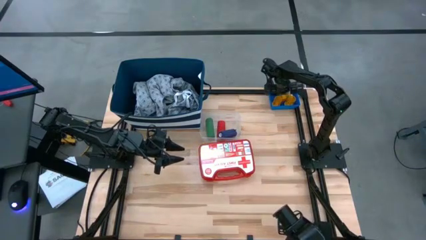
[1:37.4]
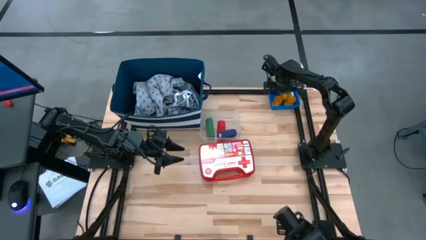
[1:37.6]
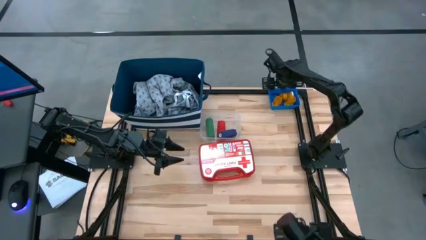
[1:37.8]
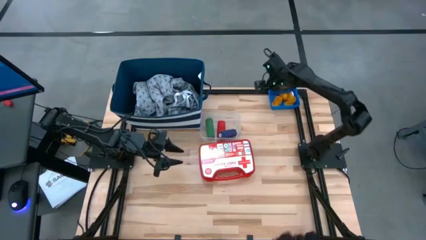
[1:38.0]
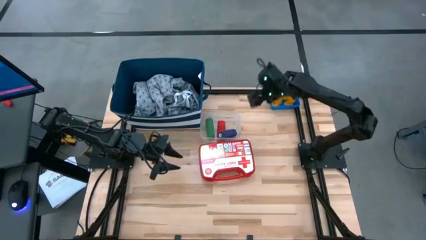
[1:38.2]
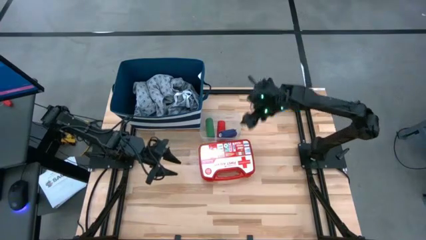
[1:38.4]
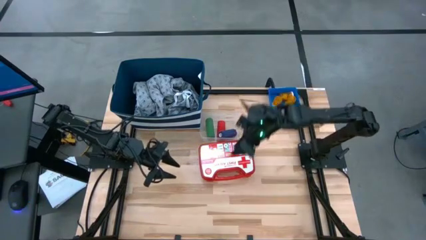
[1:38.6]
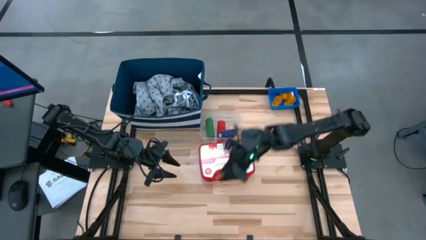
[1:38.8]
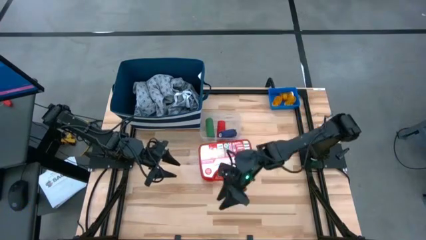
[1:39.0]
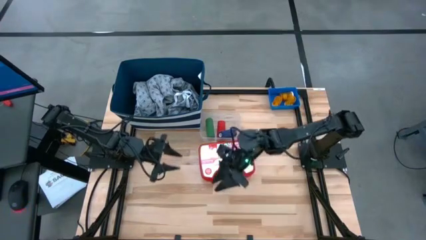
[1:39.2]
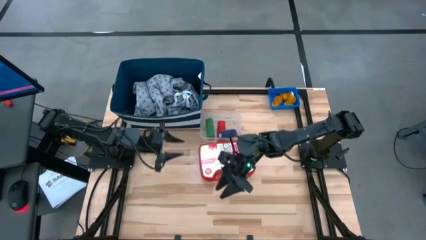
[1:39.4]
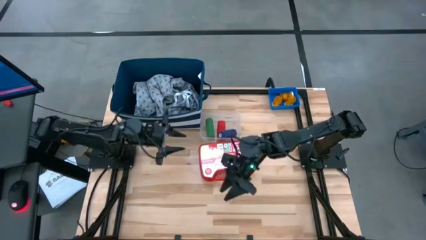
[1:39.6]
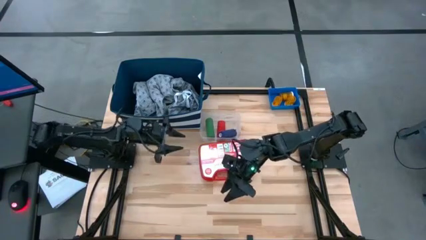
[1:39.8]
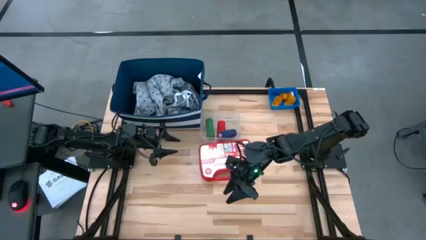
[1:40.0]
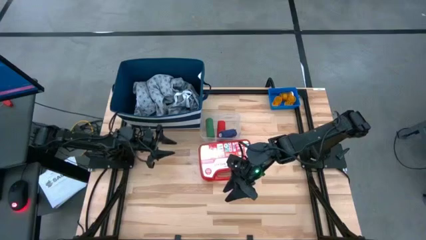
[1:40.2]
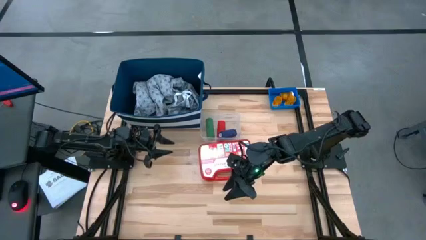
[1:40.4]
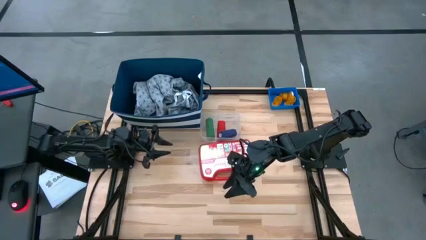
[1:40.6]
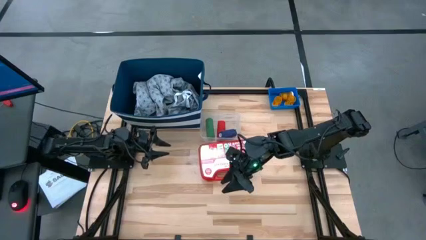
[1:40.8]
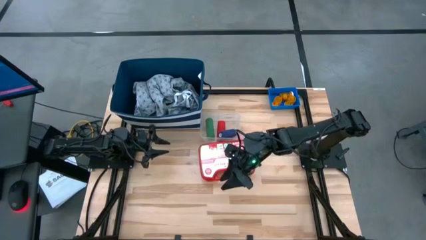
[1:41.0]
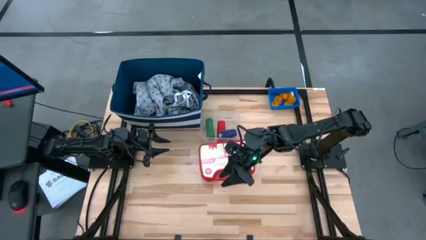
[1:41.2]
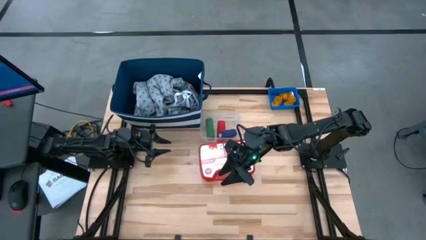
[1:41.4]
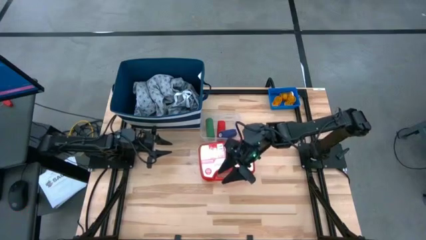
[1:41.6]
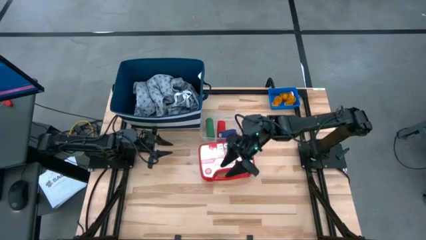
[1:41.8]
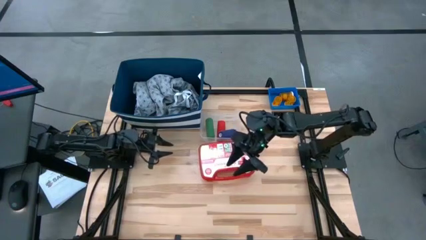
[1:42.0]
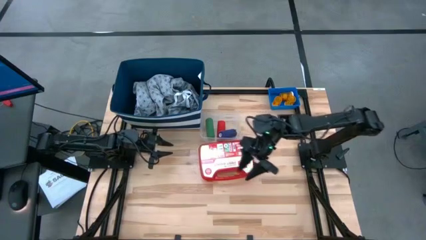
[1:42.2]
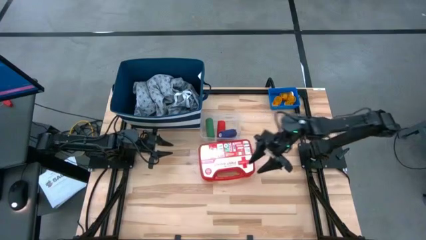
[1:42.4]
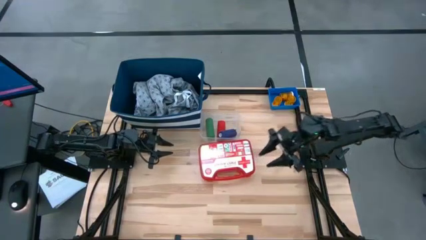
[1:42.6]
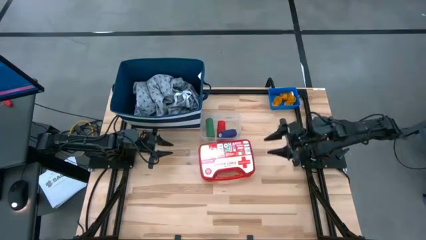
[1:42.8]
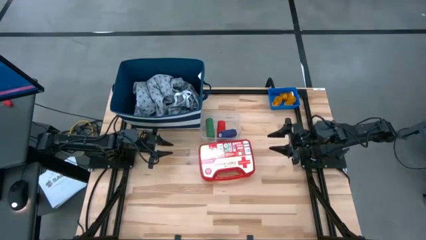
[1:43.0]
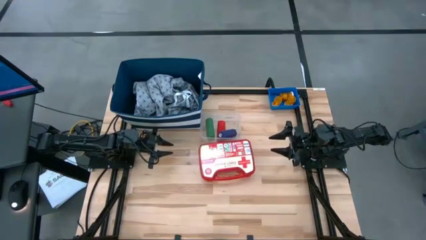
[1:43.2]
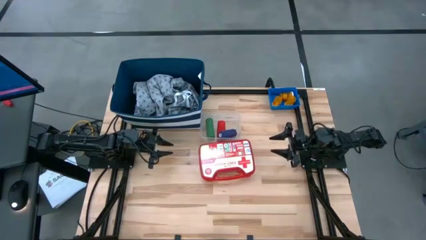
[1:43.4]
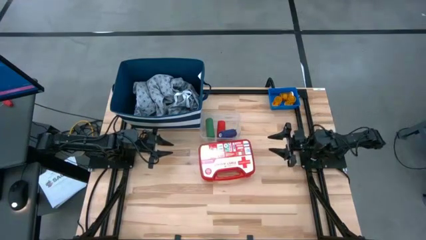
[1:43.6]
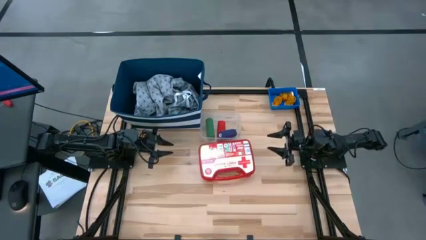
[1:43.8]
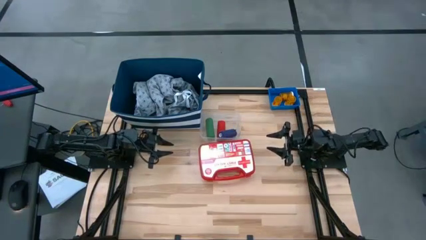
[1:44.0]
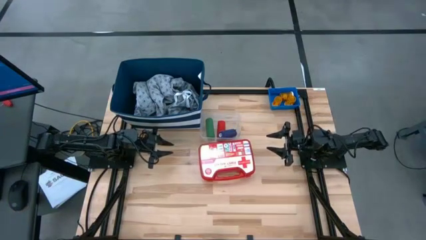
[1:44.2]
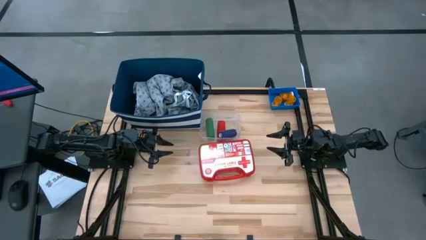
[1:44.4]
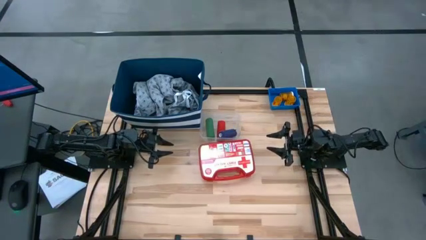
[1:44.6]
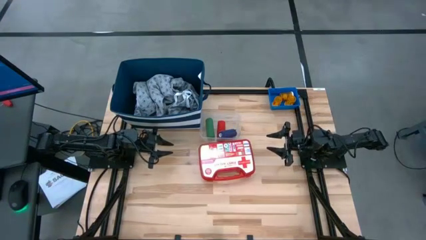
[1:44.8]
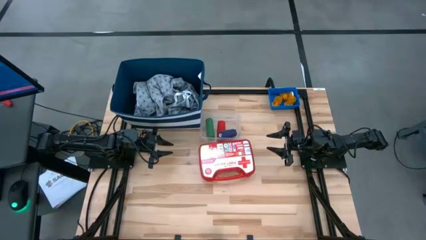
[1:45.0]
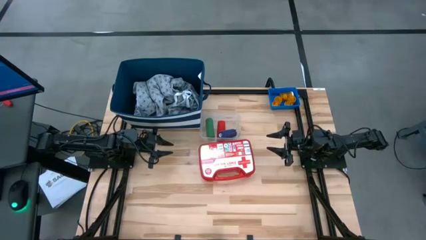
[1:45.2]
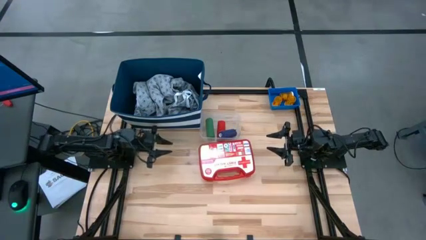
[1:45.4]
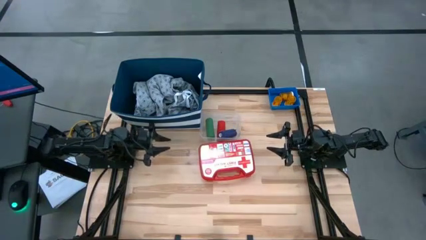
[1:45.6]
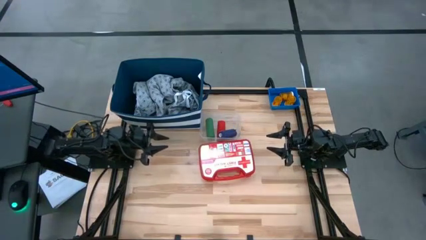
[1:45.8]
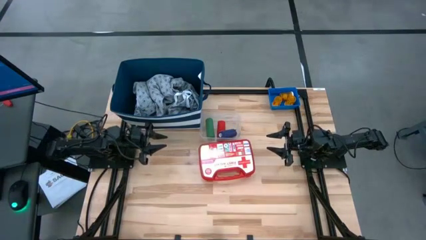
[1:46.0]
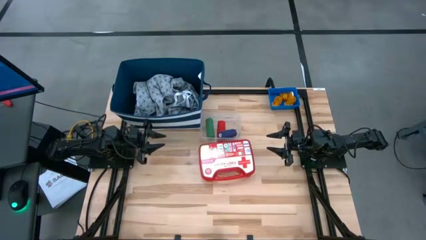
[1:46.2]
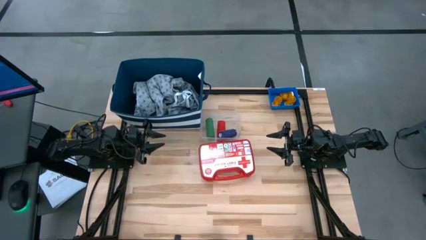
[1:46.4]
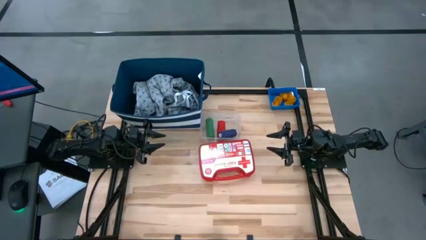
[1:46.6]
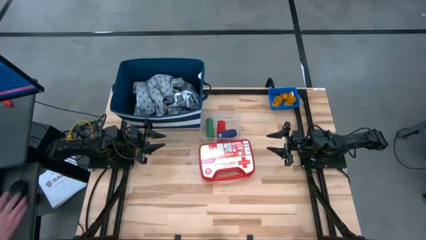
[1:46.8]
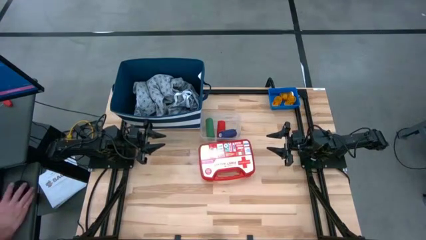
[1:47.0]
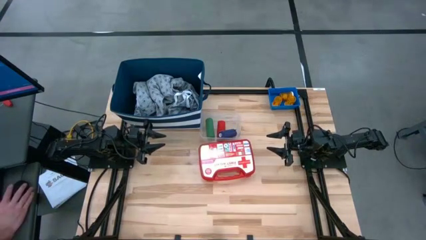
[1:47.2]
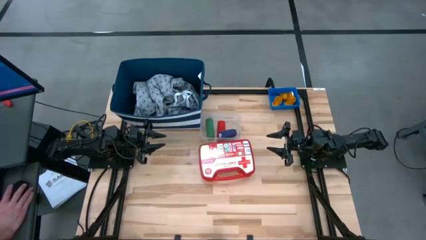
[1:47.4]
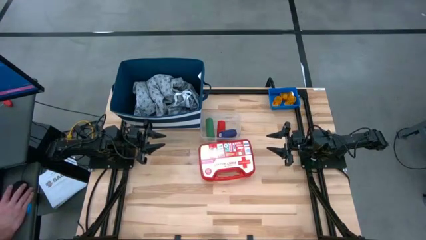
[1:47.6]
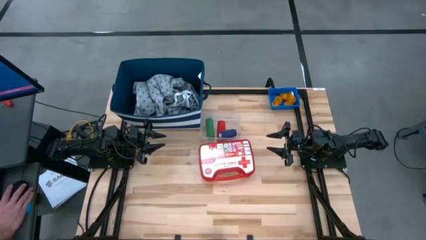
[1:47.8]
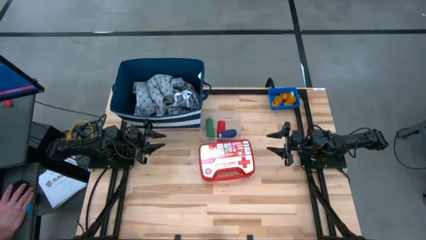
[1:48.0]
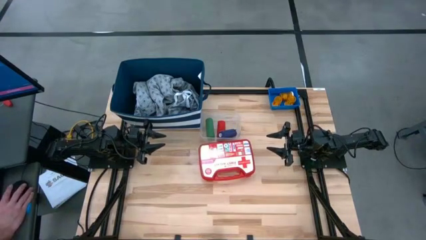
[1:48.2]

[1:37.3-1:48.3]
Task: Pick & place medical supplies in basket/bin
Return to Home Position

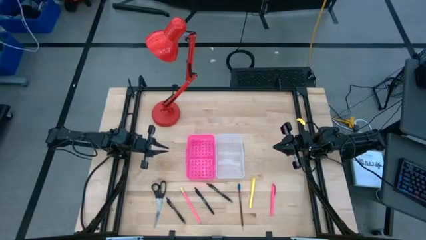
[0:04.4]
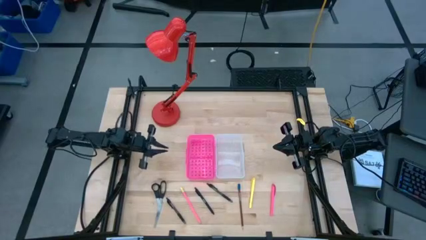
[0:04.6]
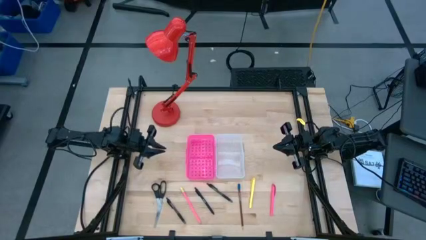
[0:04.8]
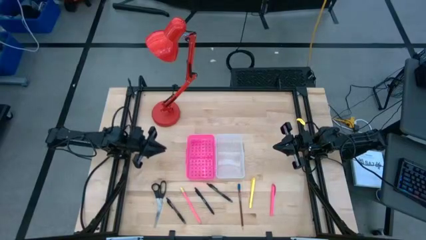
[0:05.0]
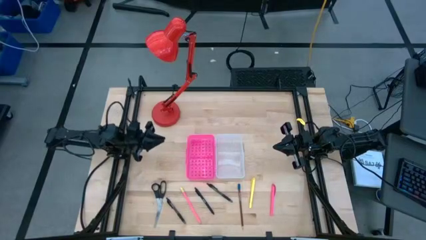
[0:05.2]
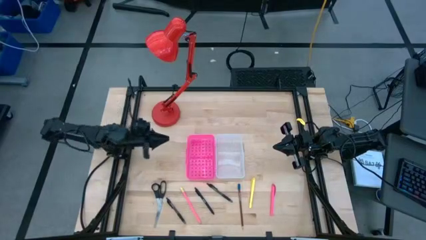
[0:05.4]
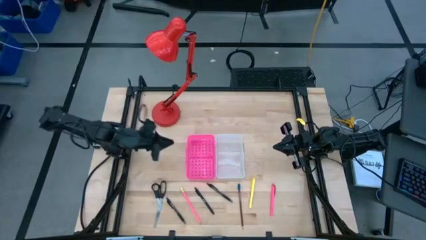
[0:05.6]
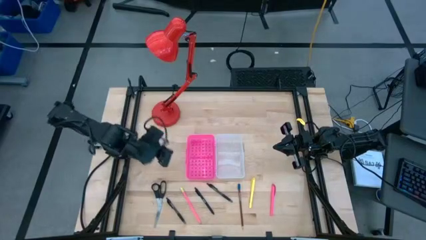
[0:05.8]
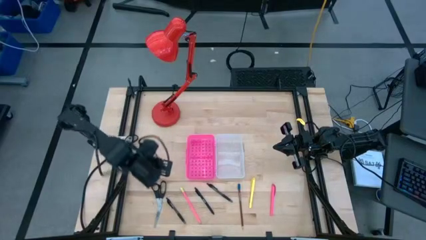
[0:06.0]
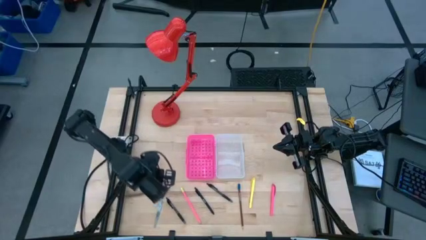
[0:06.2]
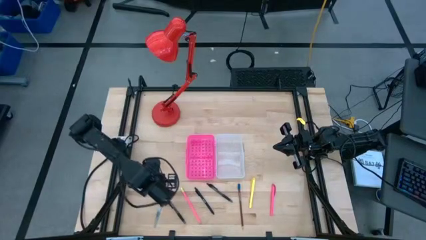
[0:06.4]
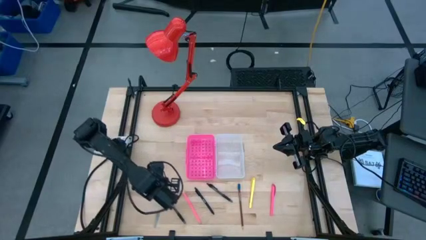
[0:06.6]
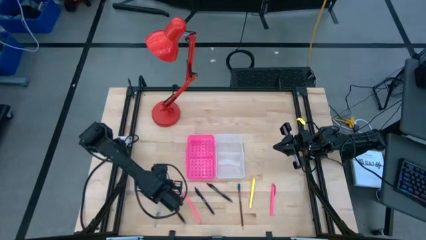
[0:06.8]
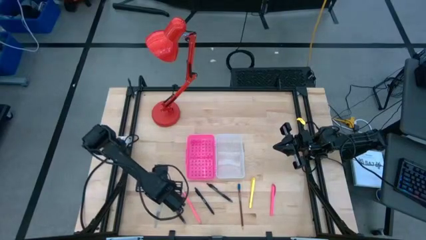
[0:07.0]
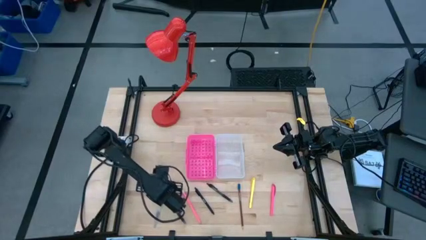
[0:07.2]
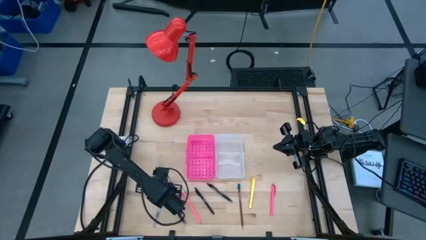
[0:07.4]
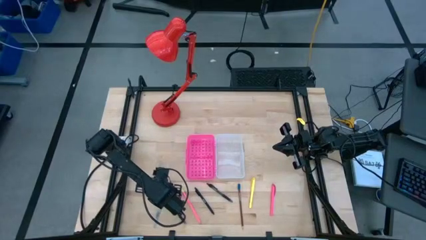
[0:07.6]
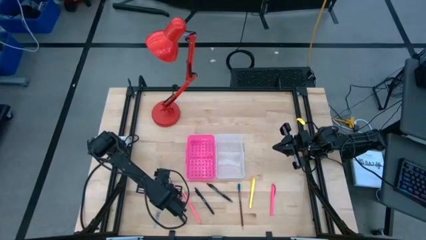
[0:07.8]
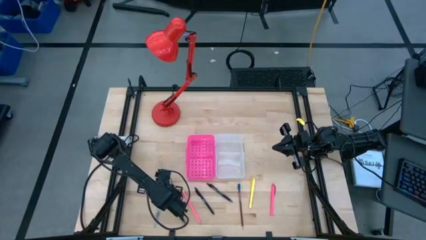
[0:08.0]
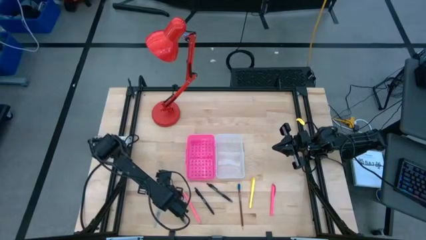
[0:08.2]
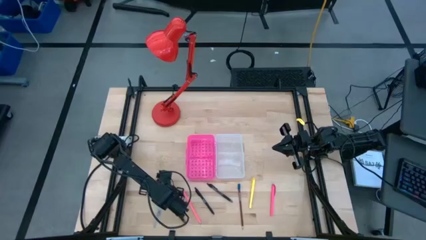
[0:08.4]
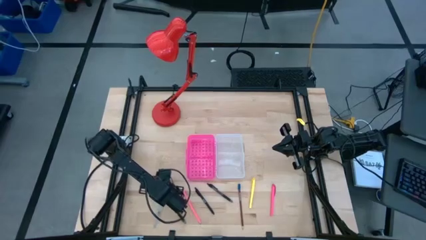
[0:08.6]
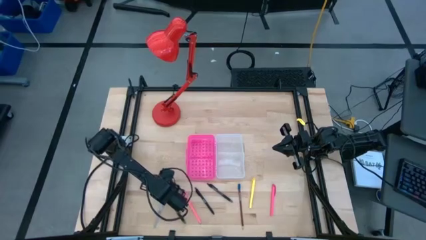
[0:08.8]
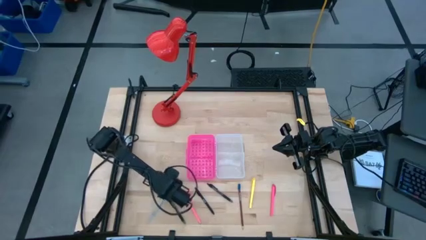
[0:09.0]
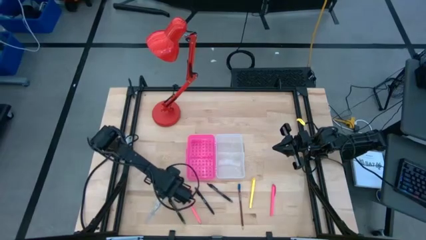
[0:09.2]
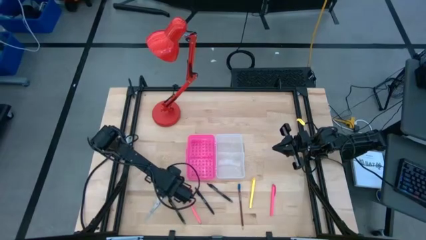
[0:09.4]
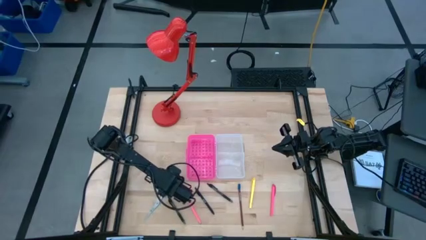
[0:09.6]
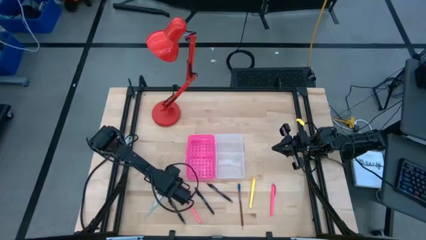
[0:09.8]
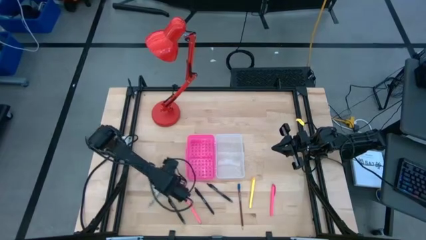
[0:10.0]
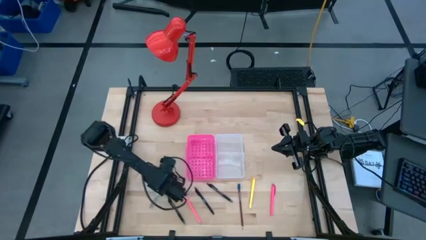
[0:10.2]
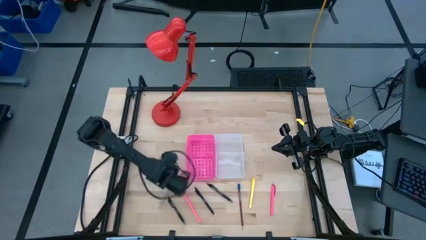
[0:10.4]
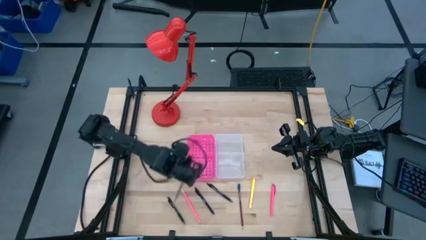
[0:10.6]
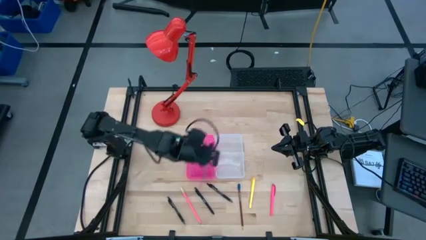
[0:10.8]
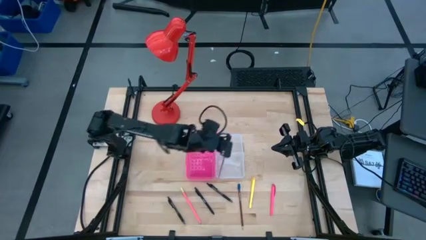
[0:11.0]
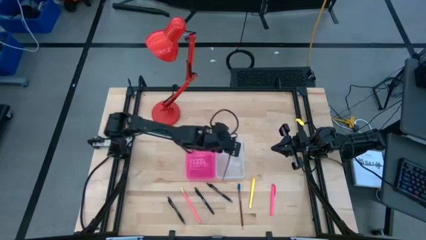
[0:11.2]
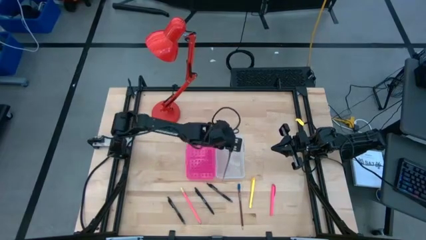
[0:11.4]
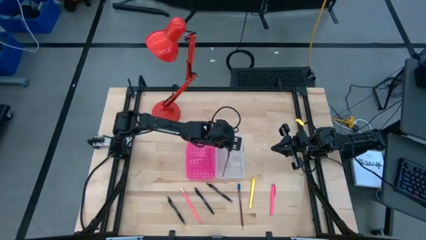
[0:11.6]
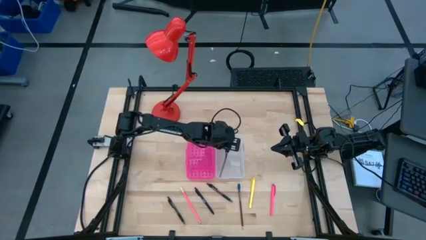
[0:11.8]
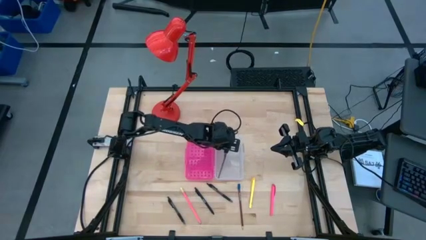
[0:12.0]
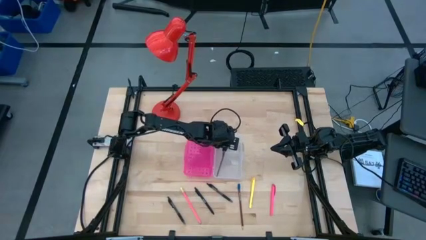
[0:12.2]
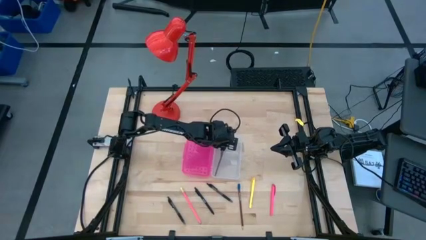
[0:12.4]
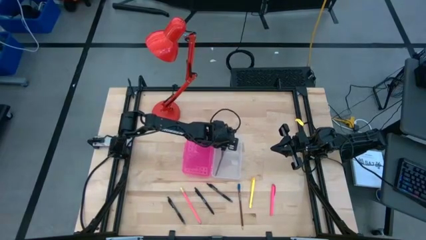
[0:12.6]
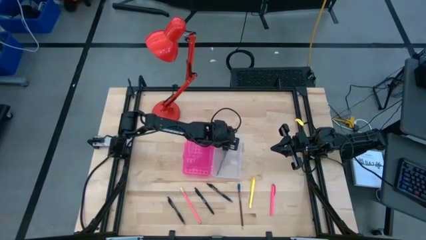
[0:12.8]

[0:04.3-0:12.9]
Task: Pick & place school supplies into a supply box
Put the black scissors into the pink supply box
